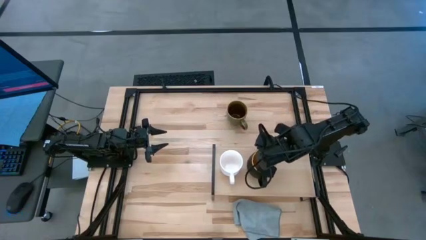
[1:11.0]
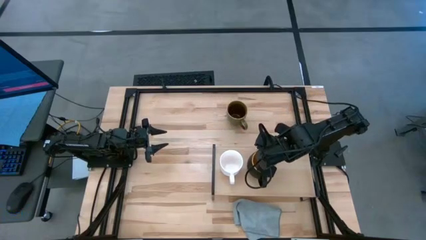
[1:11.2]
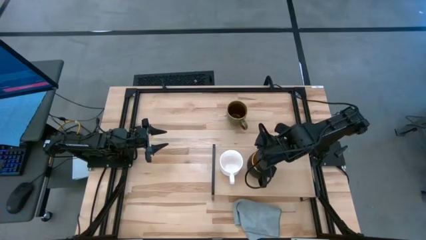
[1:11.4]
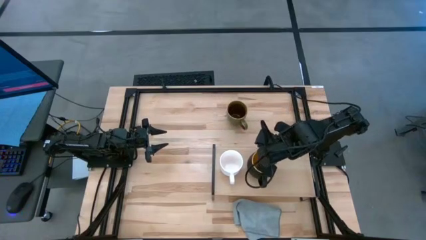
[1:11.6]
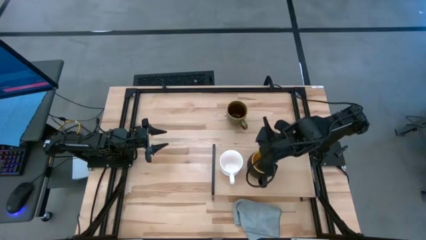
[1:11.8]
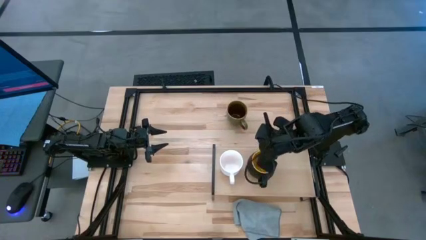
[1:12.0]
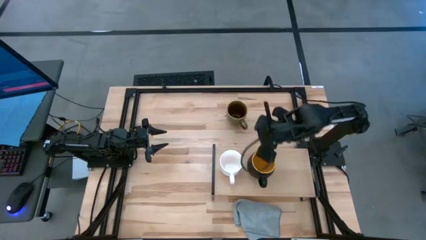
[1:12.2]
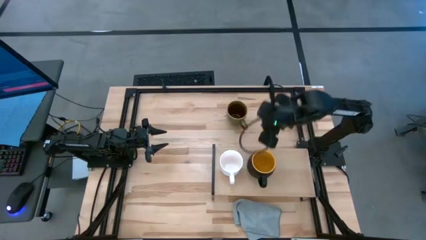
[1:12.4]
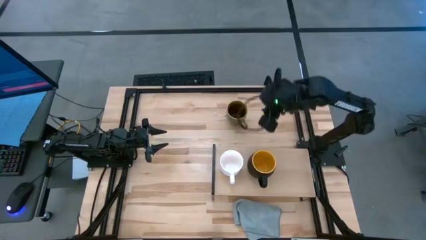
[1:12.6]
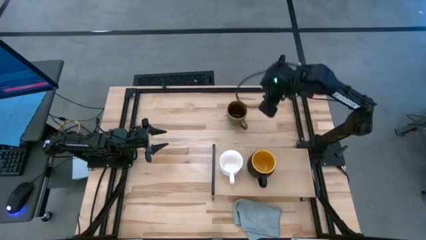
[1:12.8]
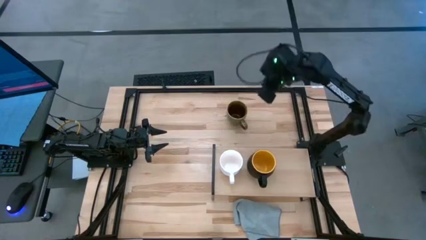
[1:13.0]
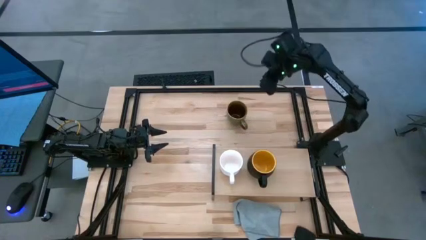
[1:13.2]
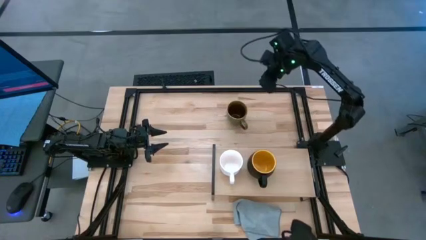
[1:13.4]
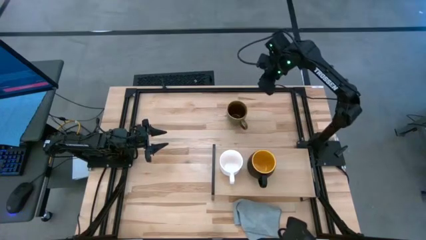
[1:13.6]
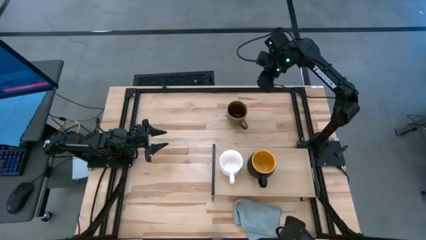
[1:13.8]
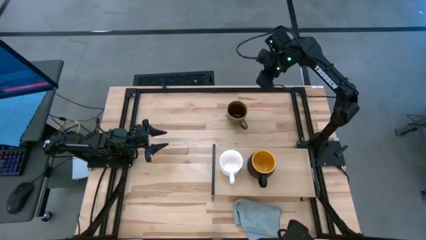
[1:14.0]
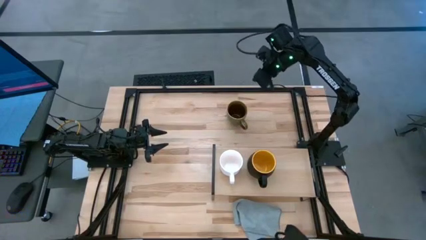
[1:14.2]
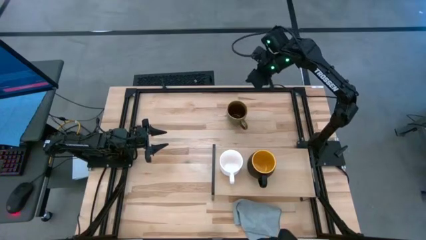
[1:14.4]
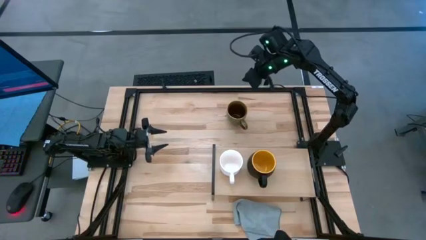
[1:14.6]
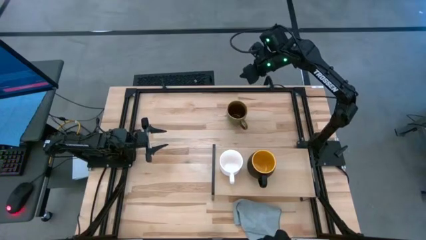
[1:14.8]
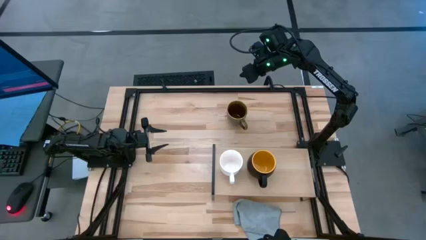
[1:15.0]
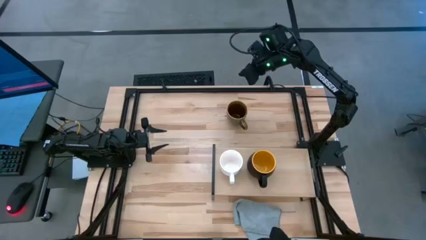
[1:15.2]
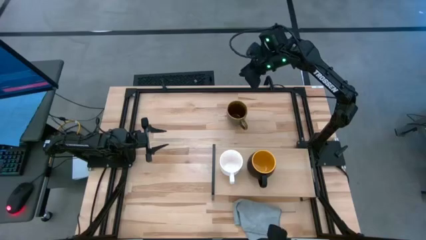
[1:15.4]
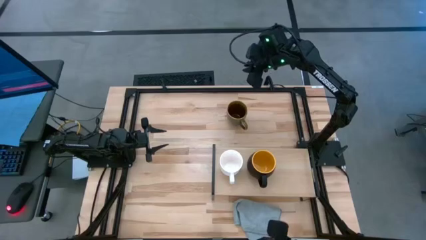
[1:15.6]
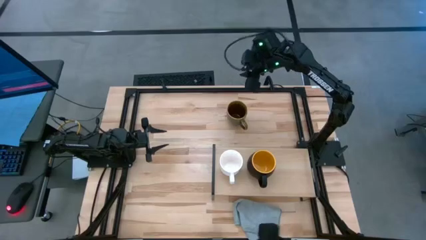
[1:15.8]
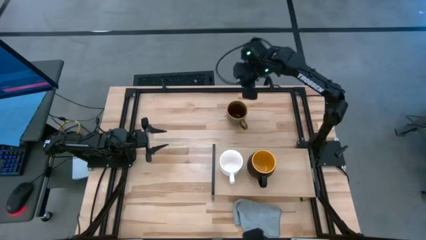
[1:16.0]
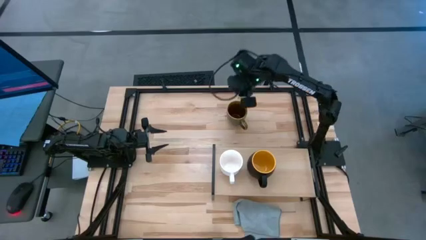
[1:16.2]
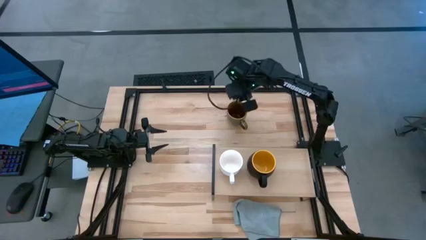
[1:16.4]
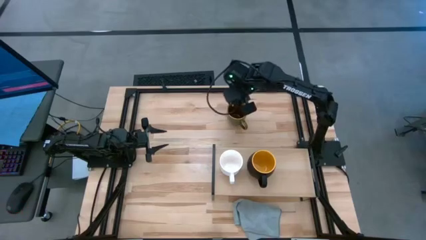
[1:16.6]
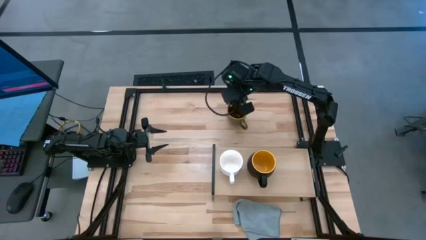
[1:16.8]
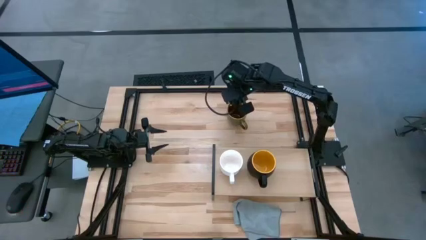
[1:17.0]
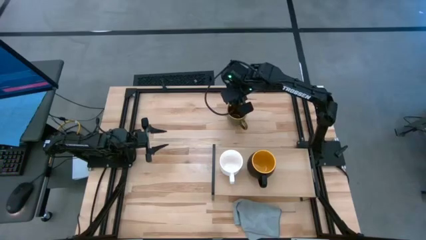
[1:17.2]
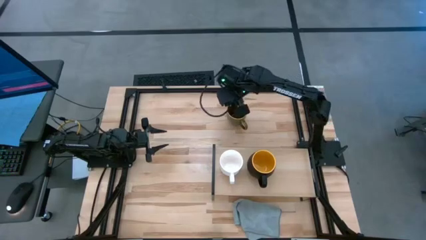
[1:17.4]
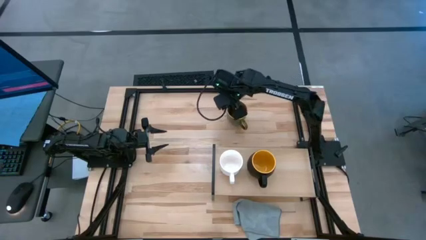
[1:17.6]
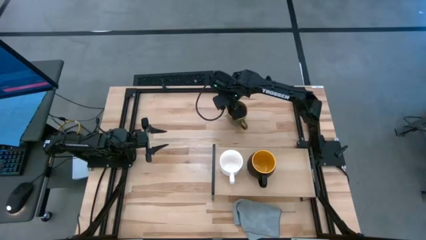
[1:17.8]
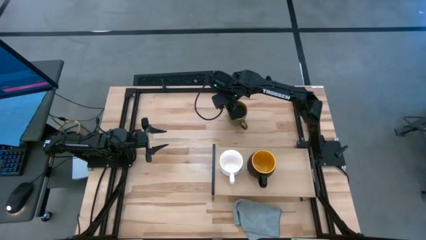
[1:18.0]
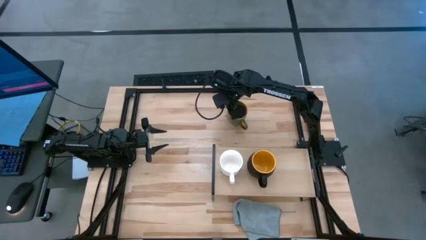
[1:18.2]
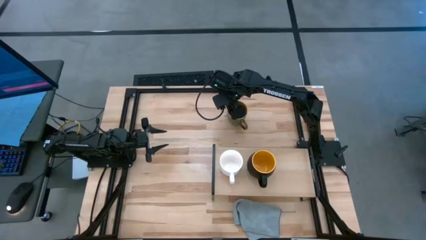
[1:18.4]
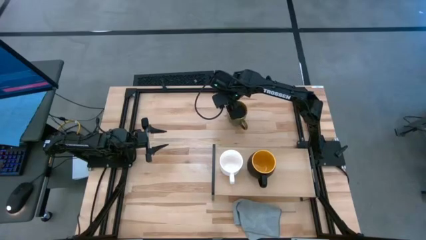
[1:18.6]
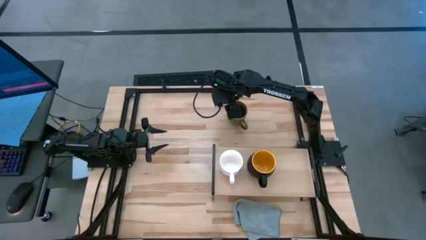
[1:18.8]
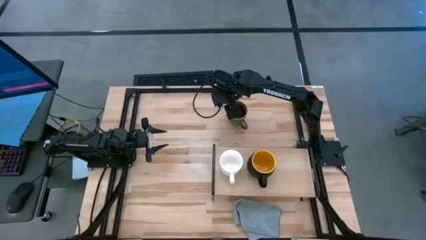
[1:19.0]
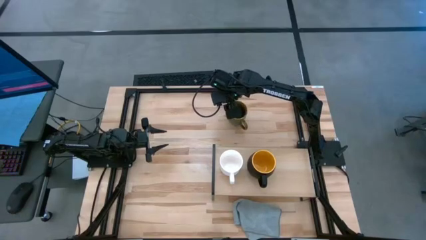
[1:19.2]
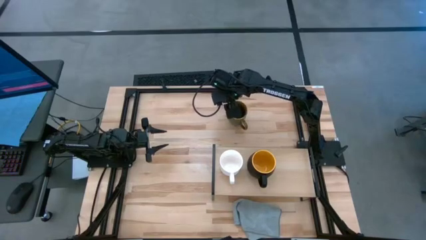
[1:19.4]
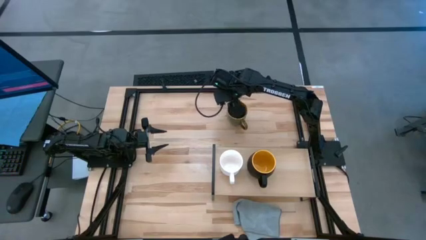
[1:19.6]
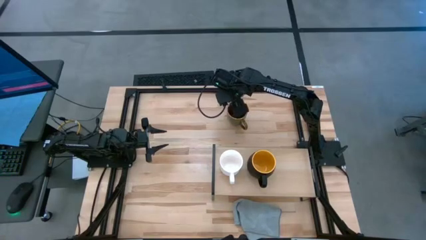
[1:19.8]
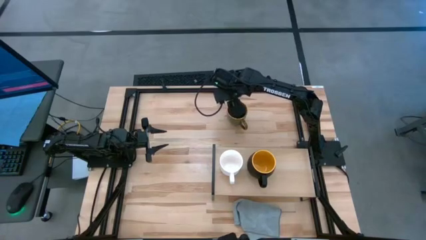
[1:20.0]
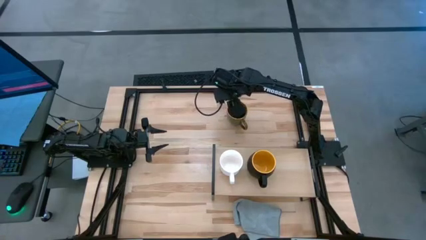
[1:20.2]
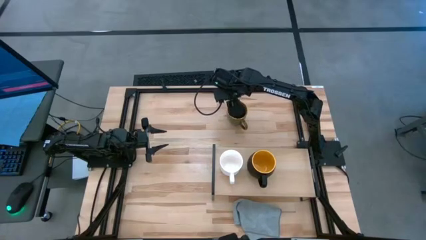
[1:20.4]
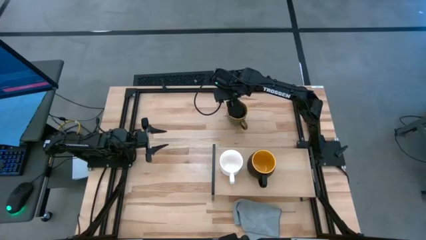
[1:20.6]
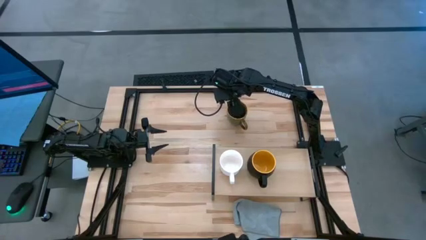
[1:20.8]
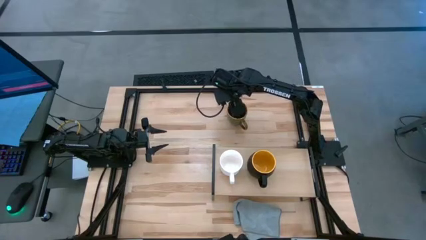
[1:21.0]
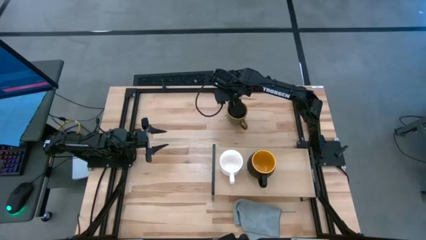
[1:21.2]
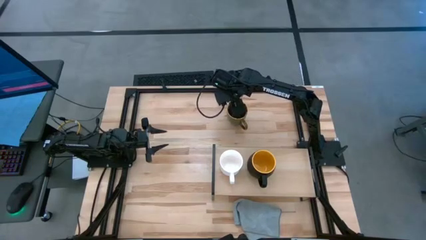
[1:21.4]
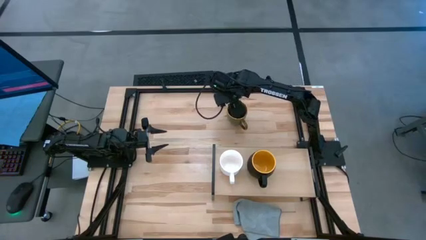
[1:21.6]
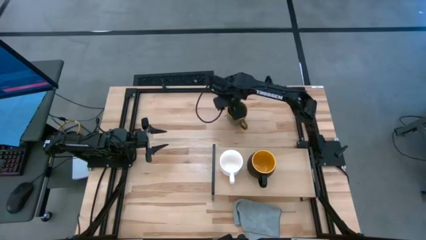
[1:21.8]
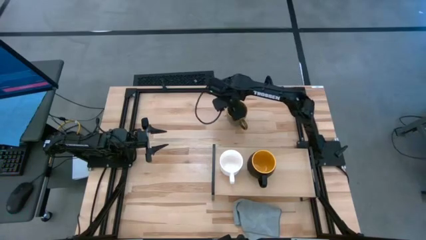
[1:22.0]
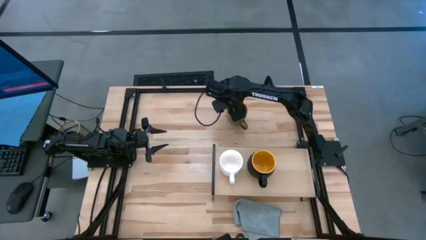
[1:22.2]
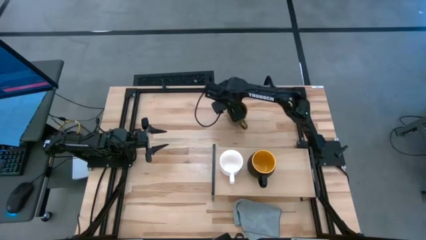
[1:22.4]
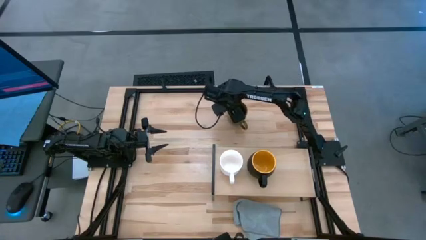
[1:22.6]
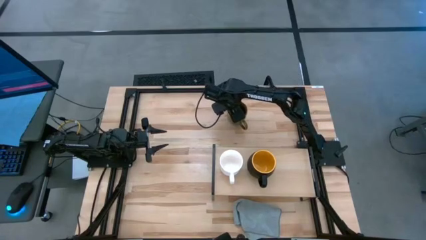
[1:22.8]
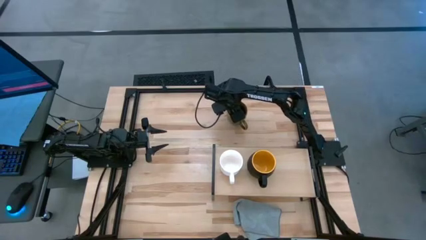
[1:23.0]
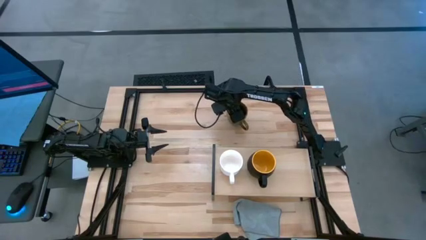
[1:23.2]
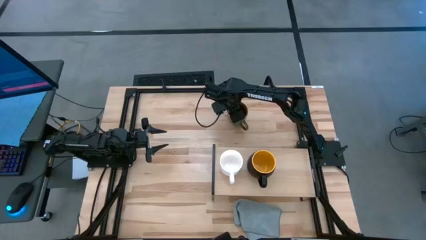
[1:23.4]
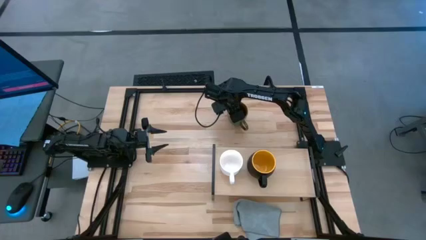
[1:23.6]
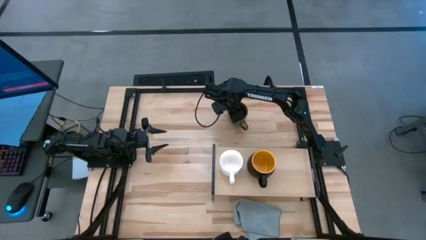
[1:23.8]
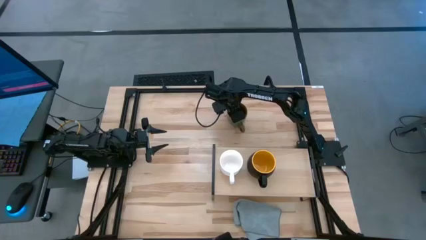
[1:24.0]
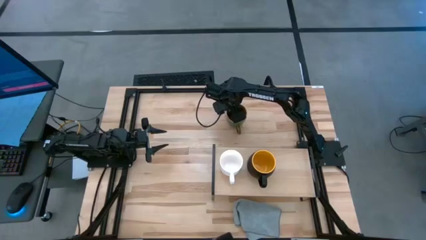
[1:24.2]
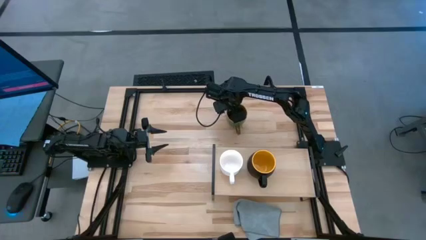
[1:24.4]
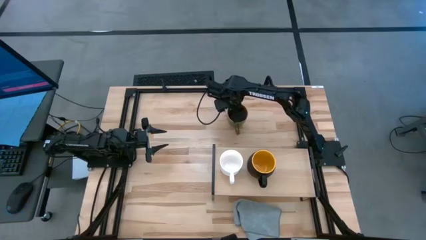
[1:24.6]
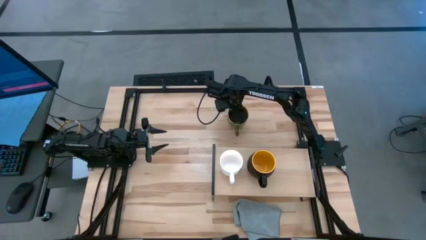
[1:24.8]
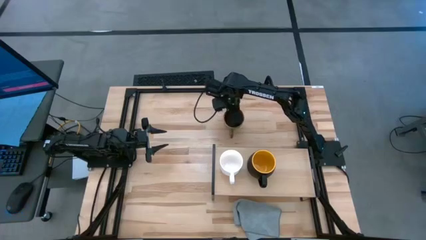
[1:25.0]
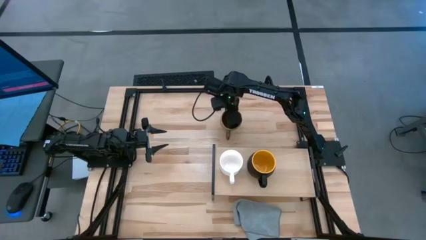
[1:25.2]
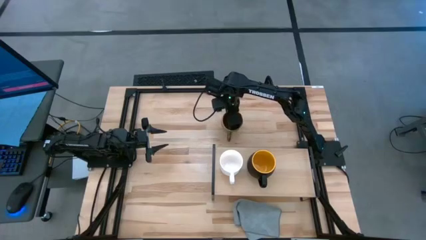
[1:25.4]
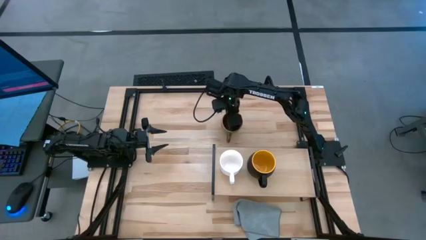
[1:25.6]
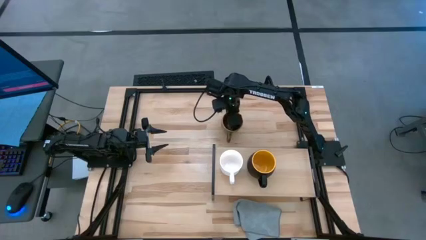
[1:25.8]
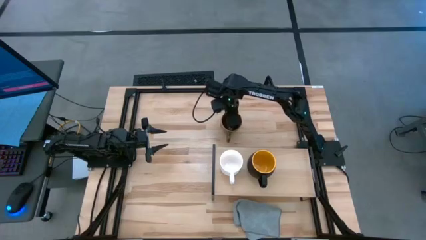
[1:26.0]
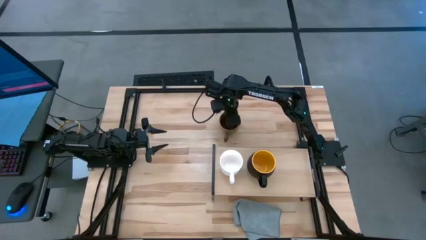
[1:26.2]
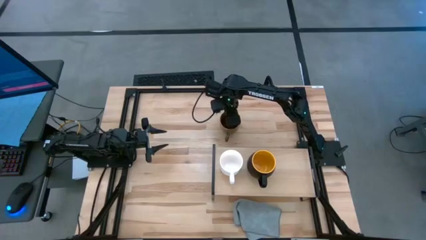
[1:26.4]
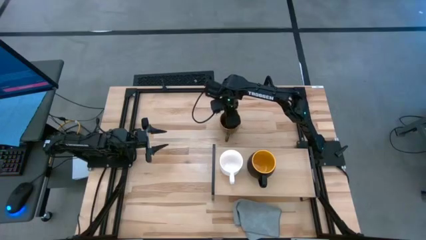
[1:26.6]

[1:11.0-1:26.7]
Task: Stack small to large cups/mugs on shelf
Put the blue mug on the shelf
